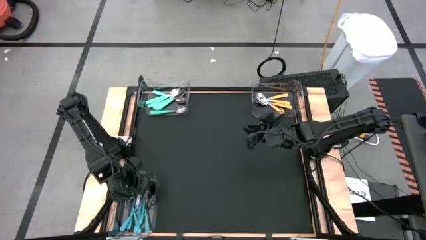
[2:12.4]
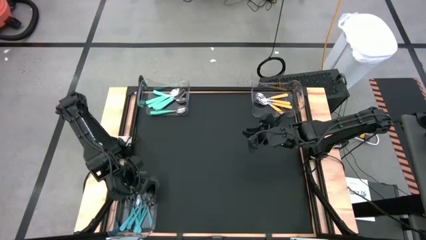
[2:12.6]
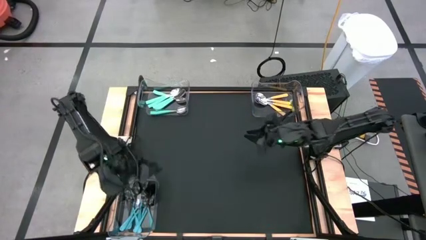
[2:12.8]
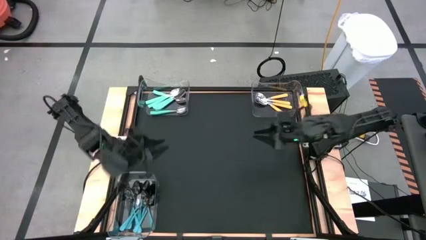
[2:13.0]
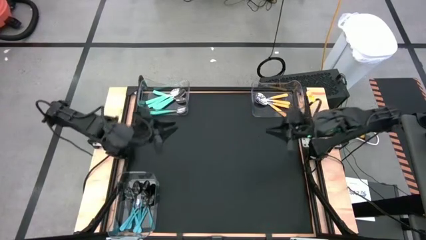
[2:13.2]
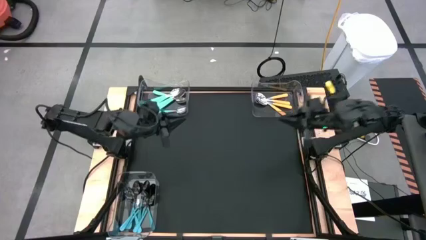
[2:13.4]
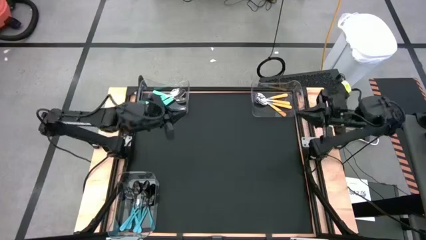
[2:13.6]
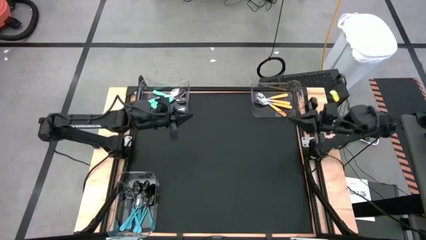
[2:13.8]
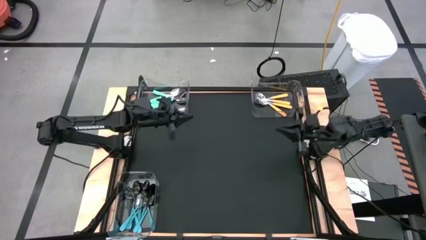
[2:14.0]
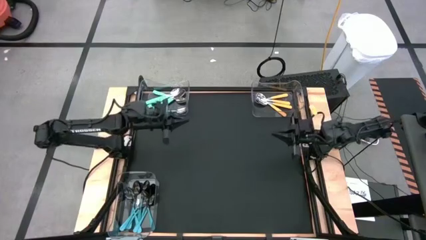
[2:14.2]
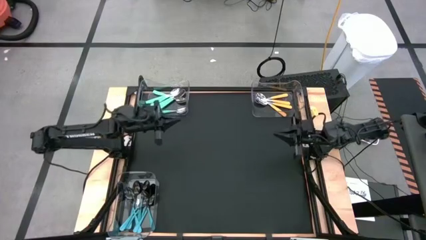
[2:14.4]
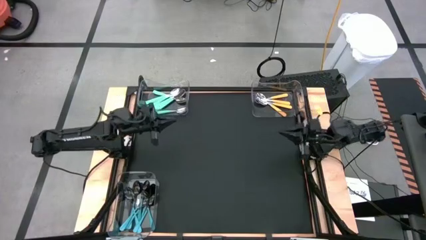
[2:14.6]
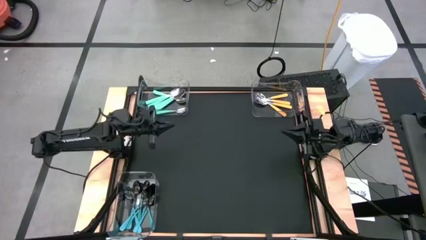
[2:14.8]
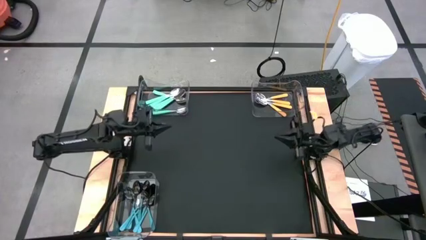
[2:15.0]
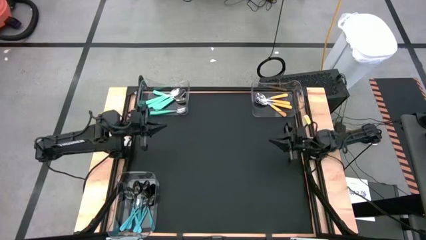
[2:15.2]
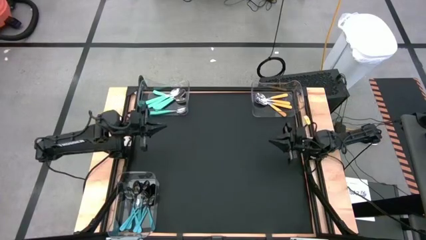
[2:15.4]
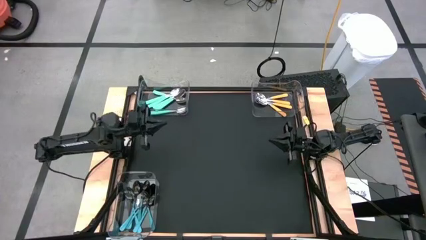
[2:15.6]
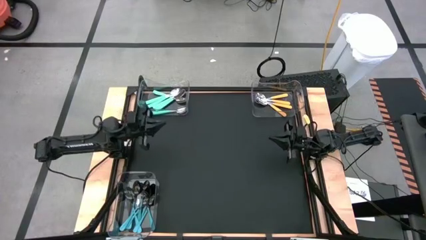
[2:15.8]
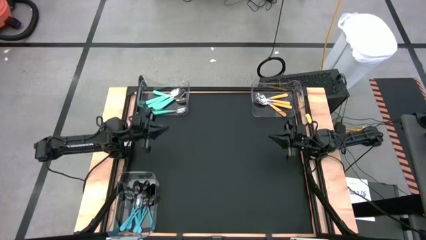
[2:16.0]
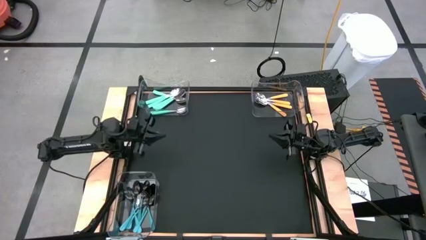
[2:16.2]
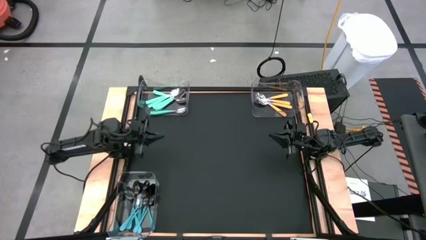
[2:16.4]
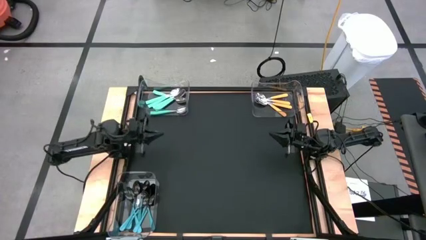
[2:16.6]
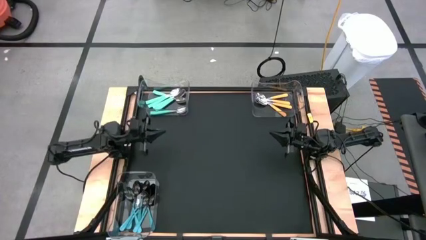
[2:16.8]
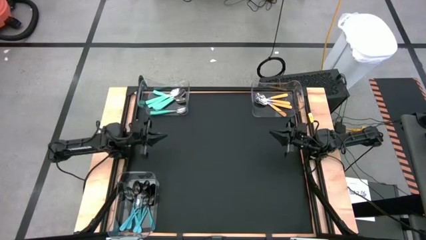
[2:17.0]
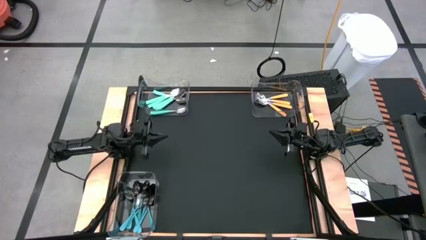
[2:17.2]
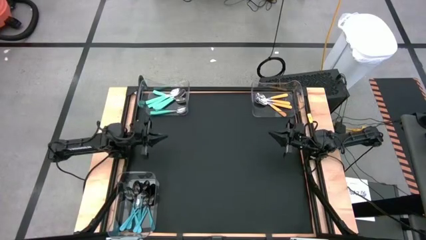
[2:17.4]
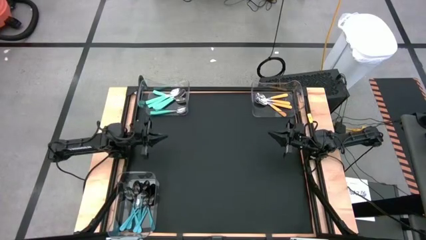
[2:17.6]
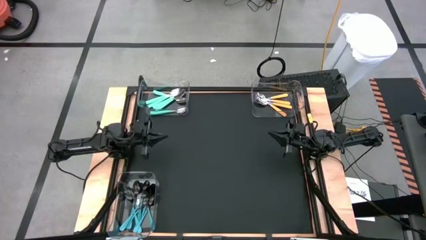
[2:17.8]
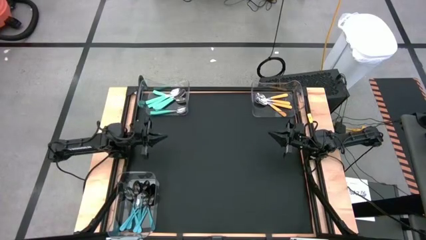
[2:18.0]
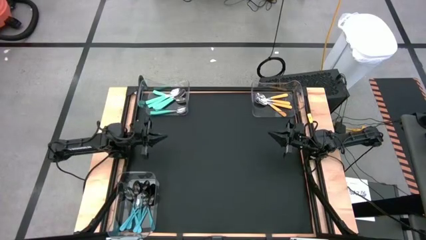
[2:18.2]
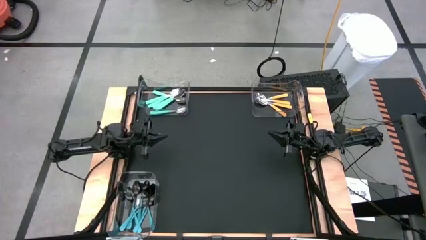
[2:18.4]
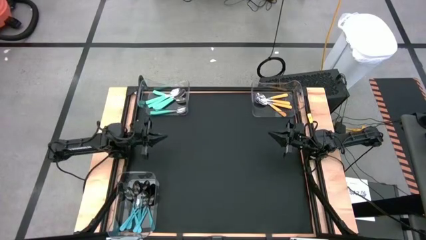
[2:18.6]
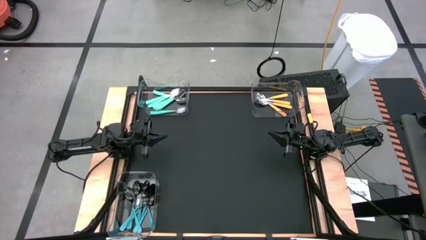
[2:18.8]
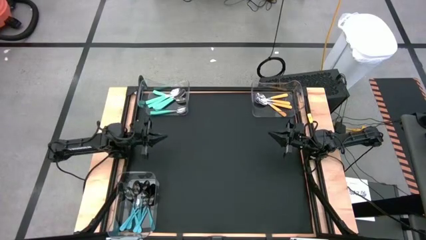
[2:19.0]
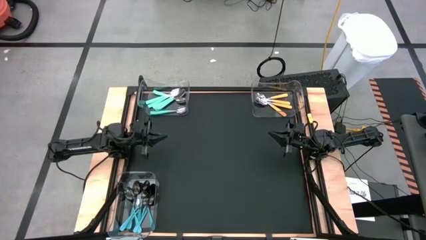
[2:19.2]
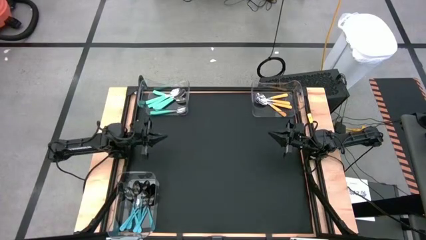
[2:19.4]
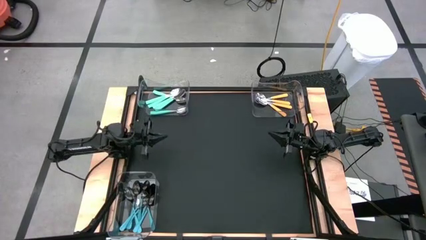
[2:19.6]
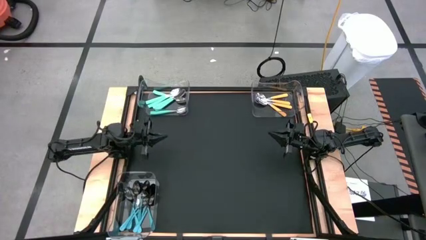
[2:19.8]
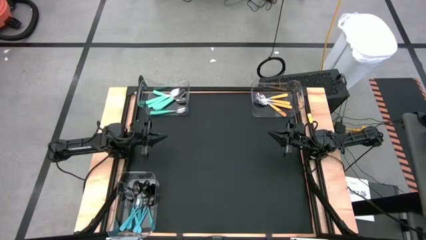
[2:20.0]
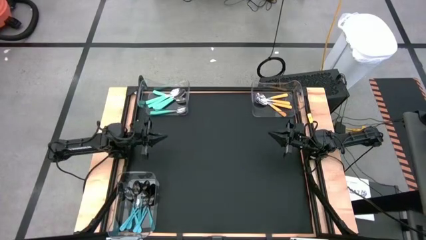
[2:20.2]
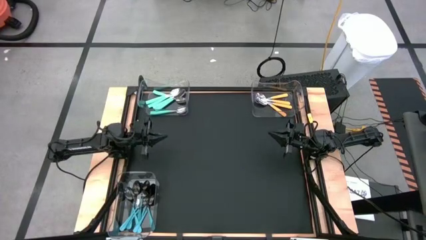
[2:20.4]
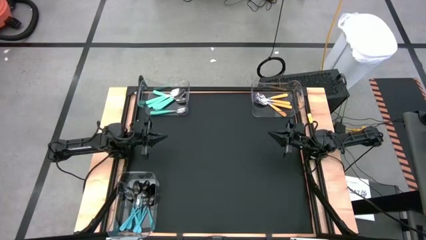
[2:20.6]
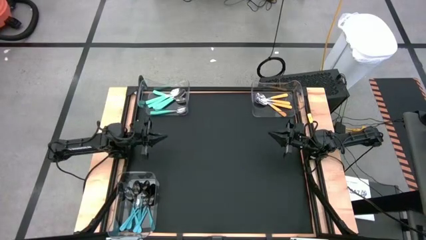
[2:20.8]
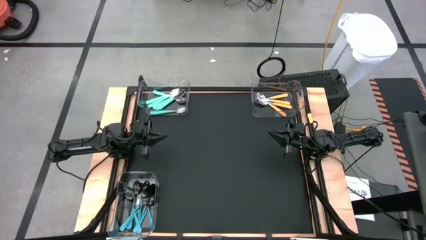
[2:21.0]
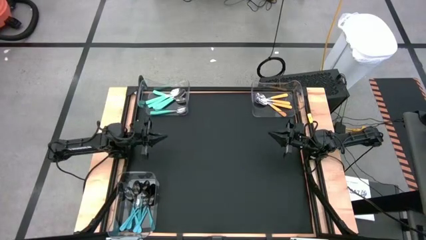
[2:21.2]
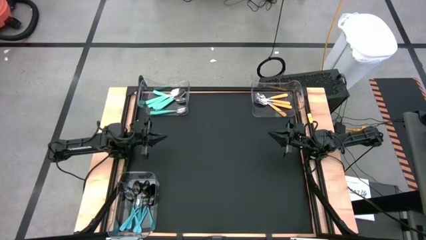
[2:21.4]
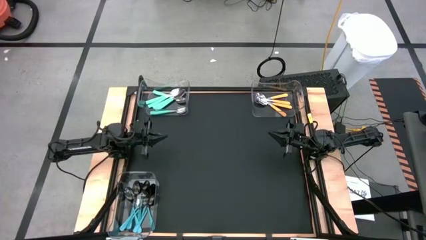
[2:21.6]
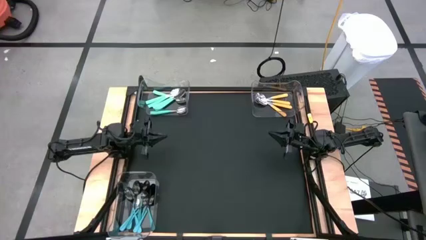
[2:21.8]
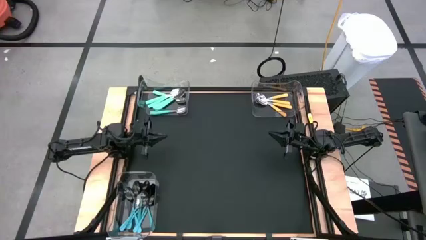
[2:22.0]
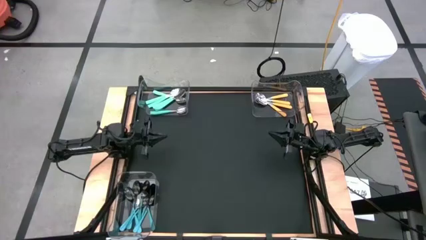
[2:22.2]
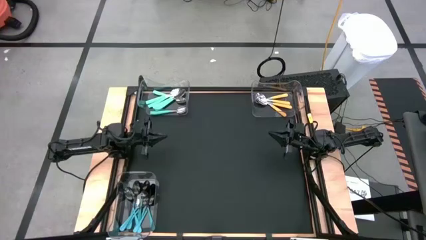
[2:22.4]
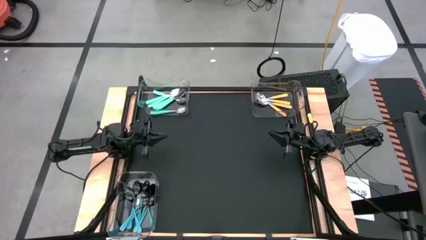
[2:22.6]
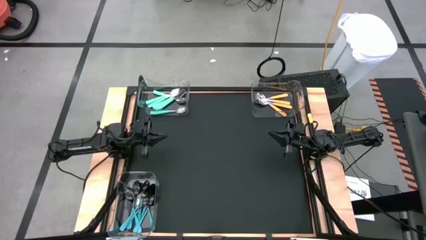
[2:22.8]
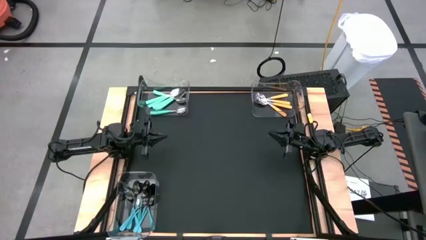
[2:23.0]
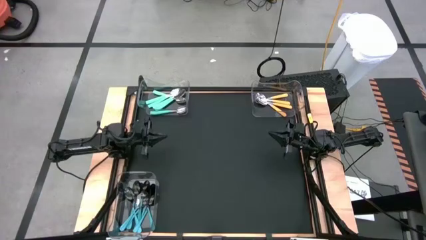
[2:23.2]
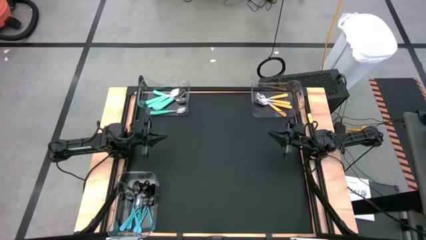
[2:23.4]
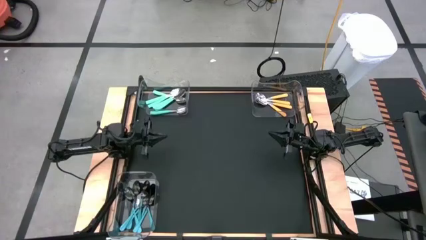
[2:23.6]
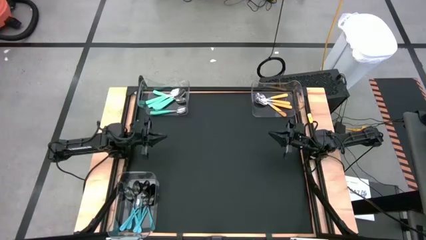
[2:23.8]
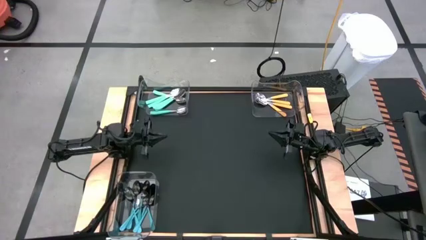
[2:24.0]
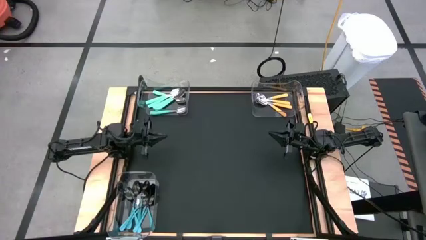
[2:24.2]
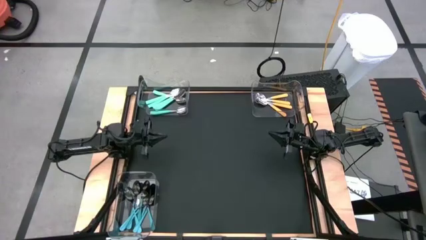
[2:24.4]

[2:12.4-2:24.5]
Task: Sort silverware by color (type)
Return to Home Position

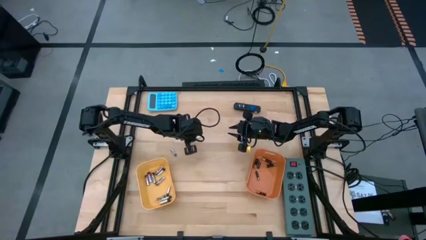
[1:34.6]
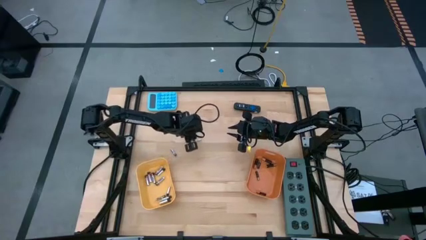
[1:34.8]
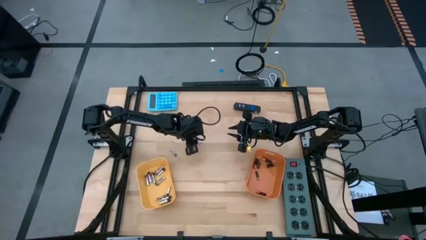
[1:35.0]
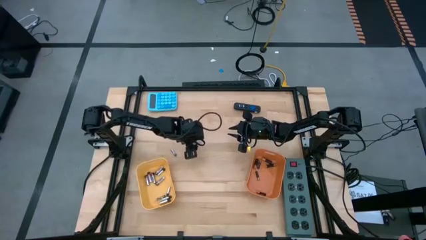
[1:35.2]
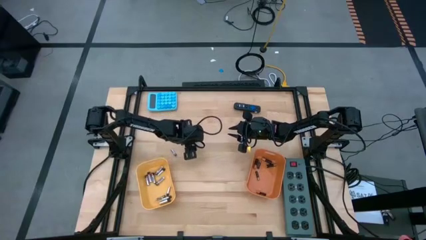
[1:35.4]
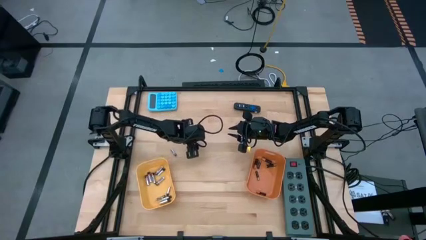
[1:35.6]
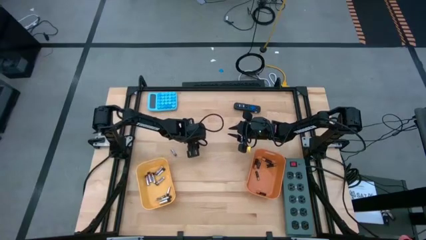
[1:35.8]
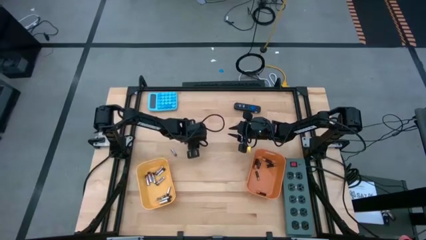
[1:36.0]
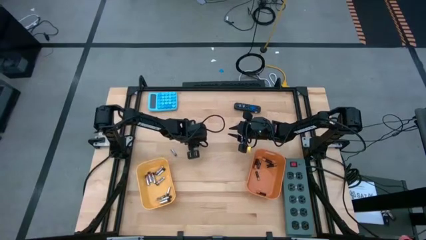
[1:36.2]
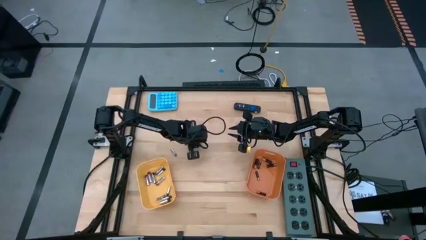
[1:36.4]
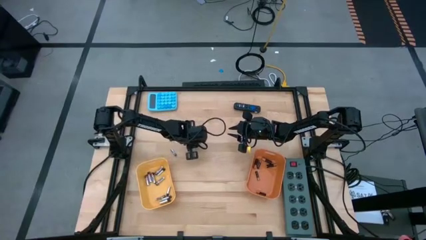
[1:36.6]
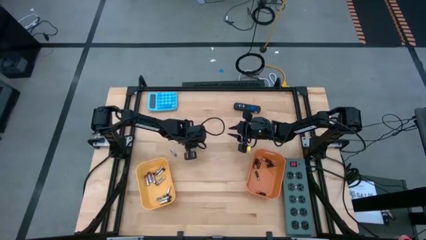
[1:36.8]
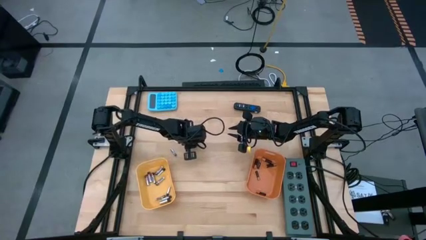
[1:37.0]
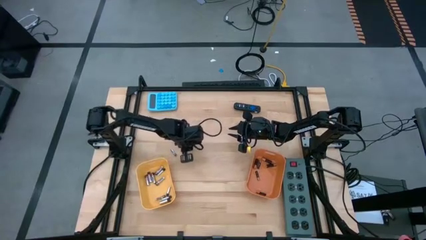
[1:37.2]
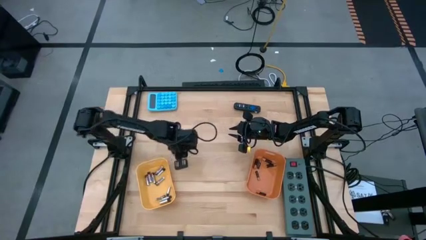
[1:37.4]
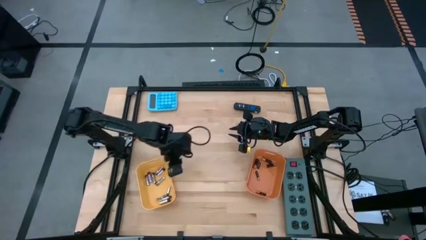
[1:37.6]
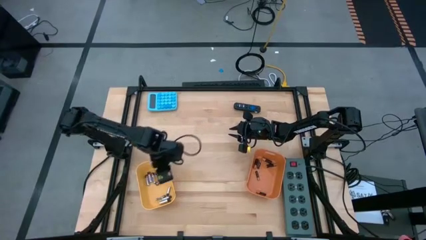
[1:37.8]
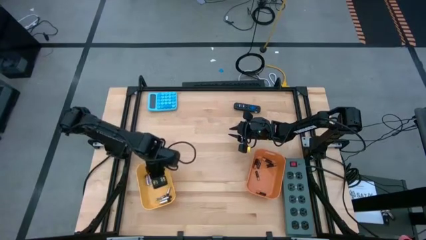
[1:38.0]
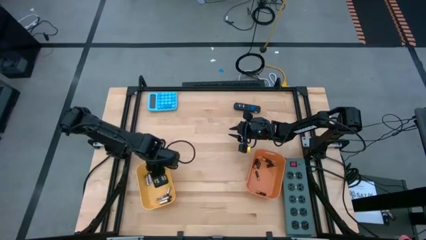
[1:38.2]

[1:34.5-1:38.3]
Task: Sort batteries
Put the silver battery into the yellow bin

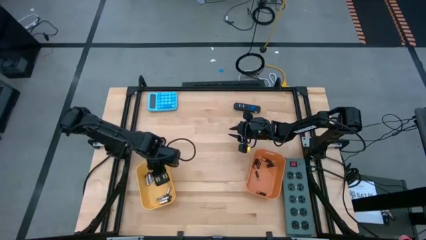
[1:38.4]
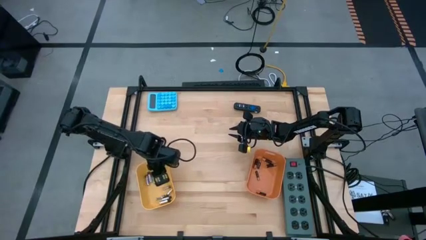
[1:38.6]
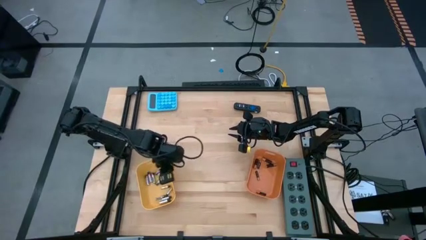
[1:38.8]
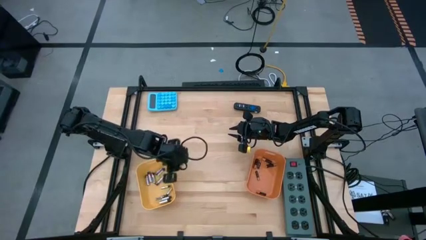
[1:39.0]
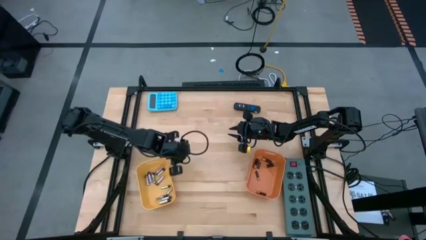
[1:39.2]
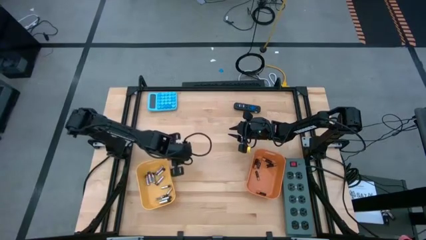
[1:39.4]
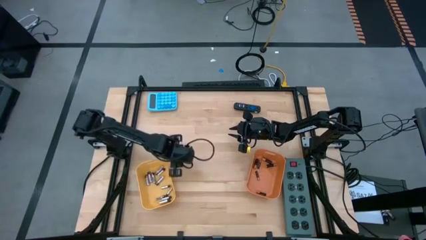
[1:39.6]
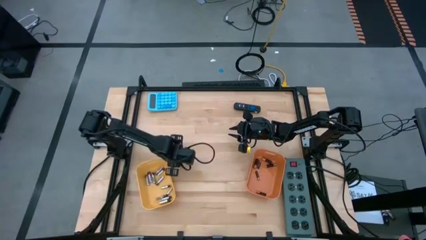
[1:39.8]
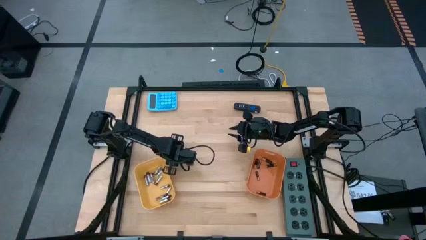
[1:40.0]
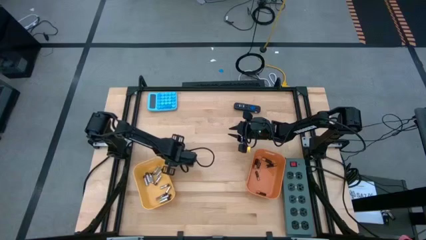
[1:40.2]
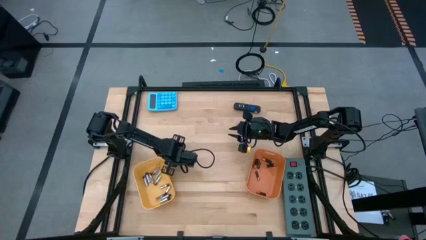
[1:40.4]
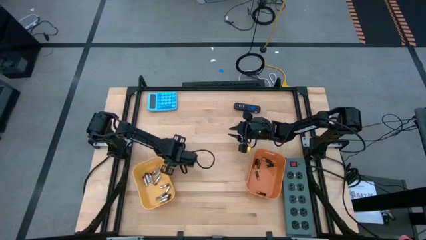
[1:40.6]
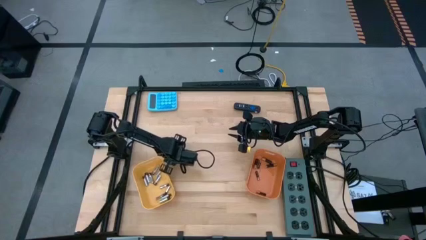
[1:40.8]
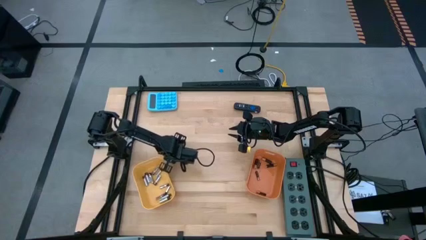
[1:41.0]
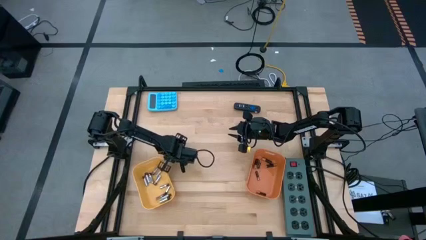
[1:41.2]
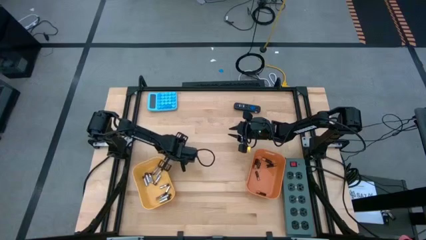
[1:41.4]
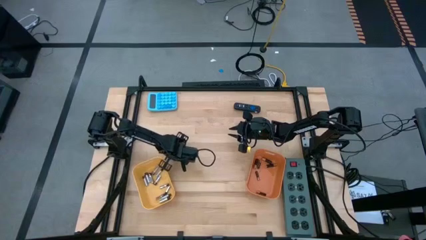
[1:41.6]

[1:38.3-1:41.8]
Put the silver battery into the yellow bin
